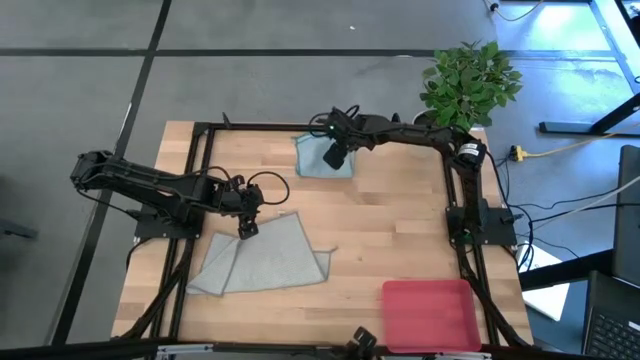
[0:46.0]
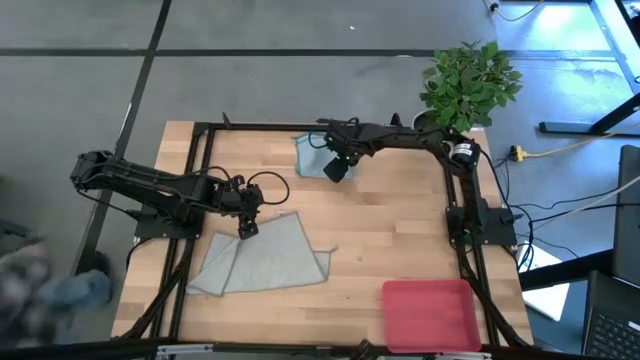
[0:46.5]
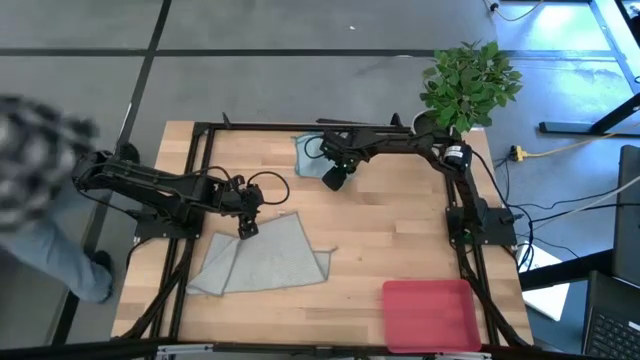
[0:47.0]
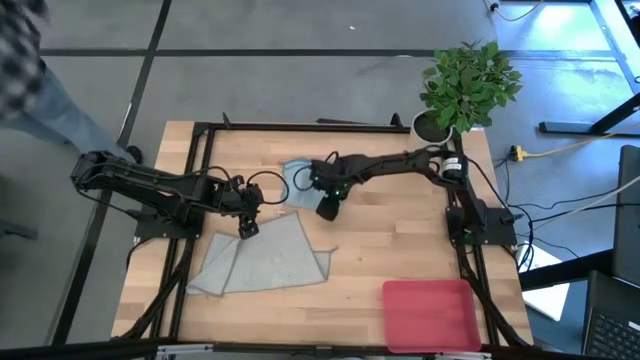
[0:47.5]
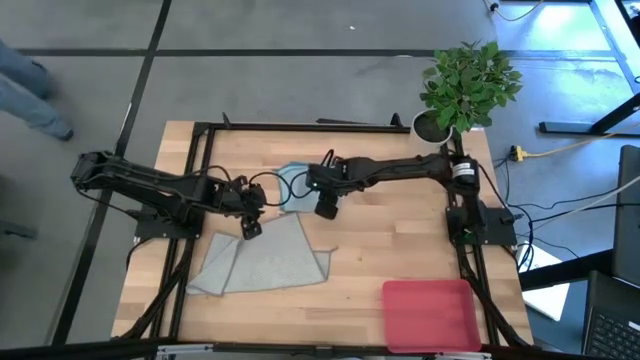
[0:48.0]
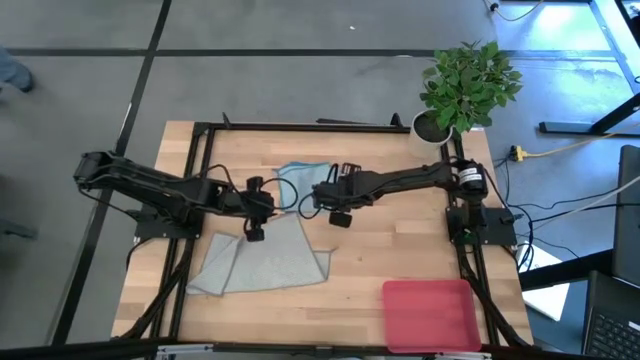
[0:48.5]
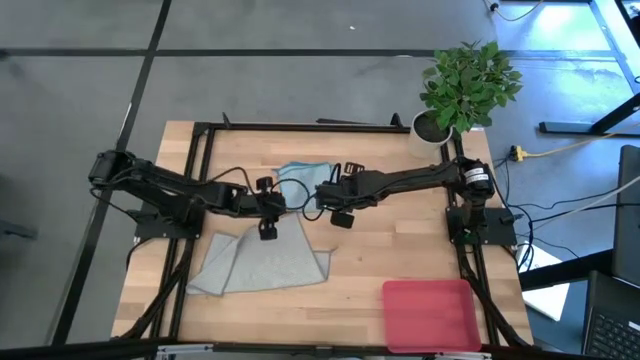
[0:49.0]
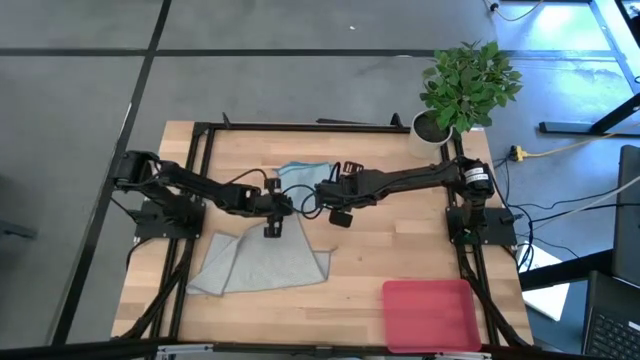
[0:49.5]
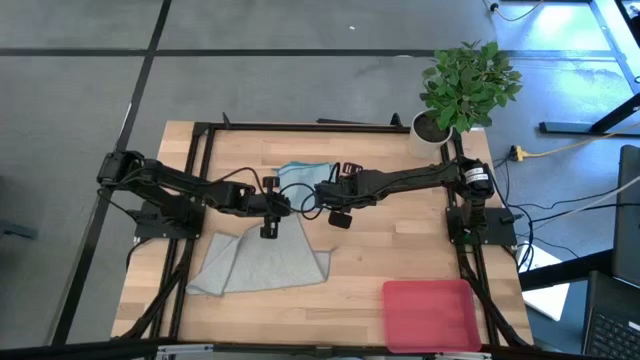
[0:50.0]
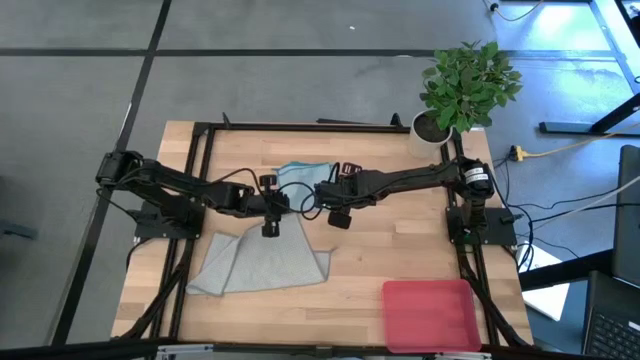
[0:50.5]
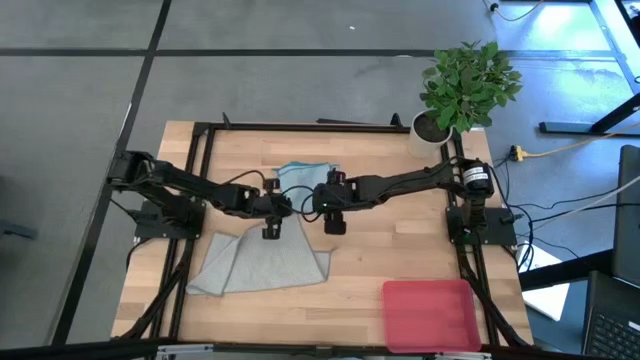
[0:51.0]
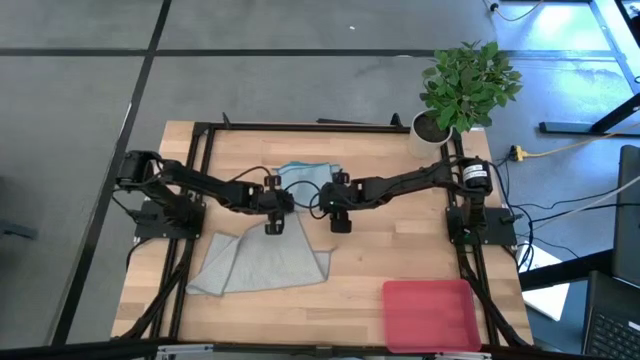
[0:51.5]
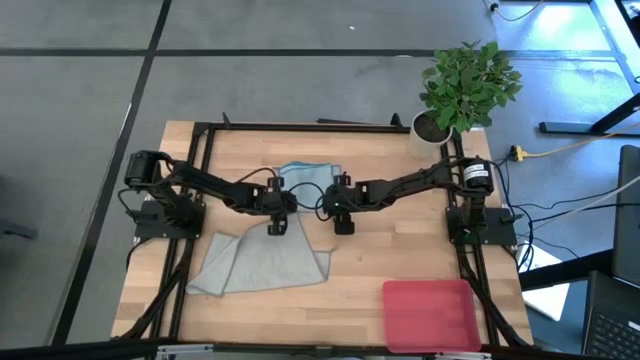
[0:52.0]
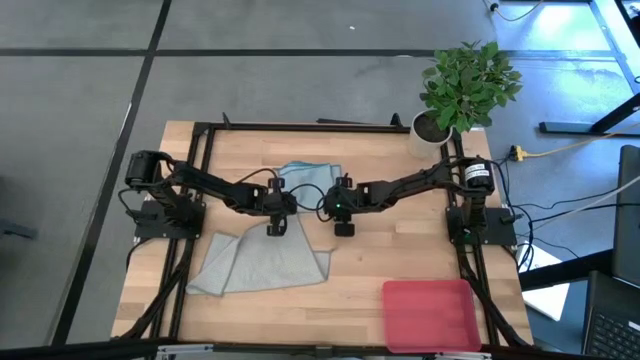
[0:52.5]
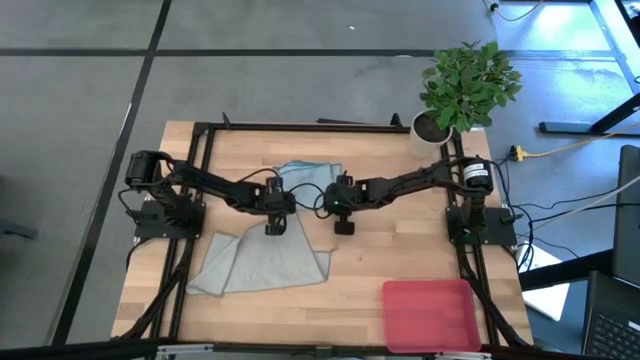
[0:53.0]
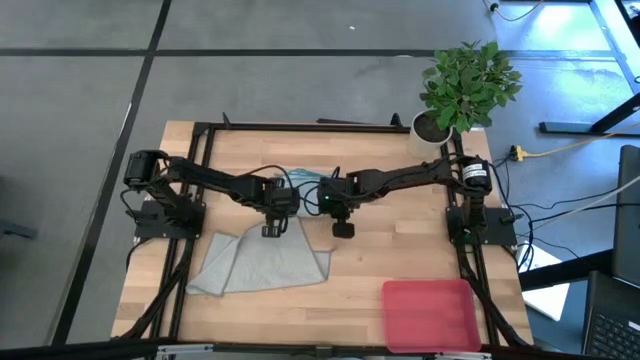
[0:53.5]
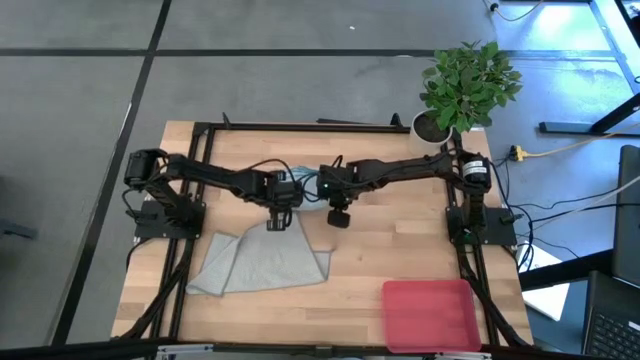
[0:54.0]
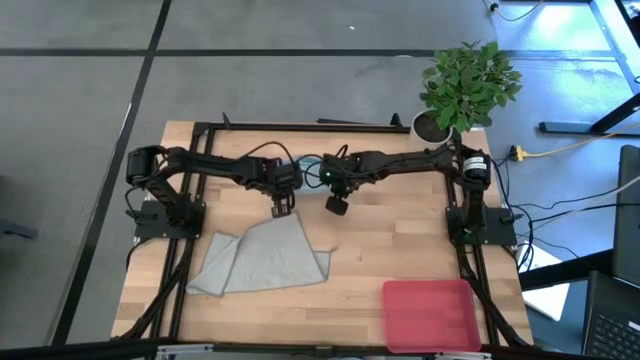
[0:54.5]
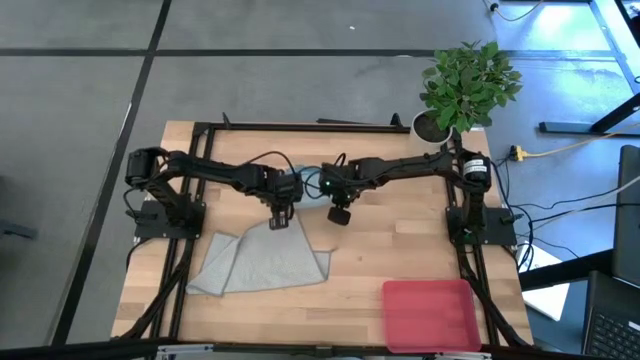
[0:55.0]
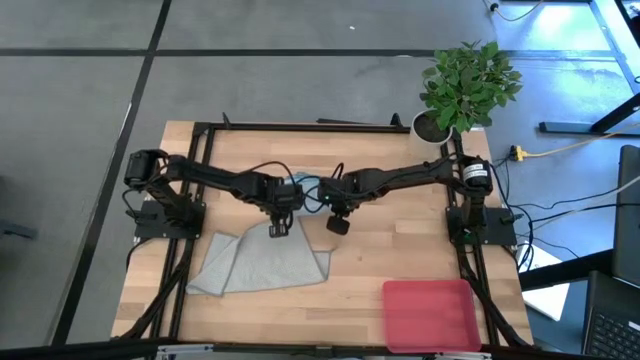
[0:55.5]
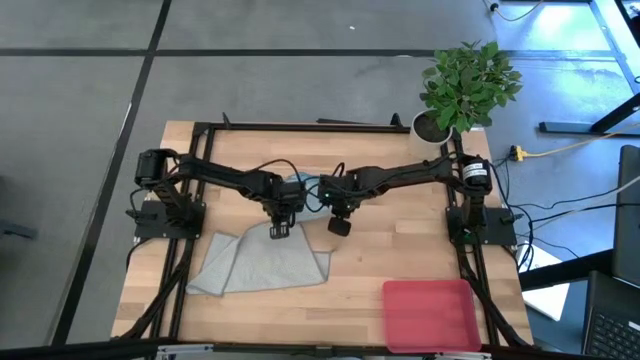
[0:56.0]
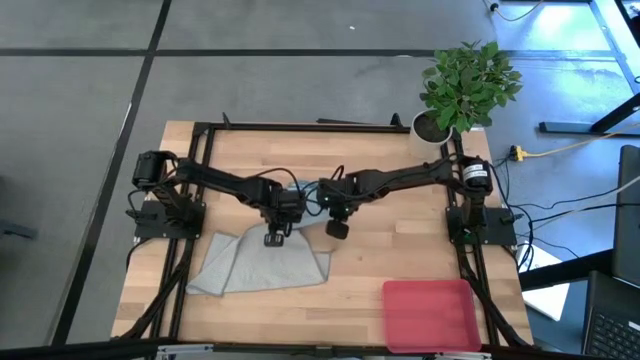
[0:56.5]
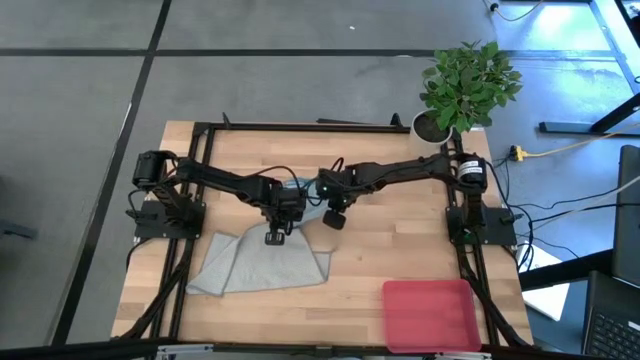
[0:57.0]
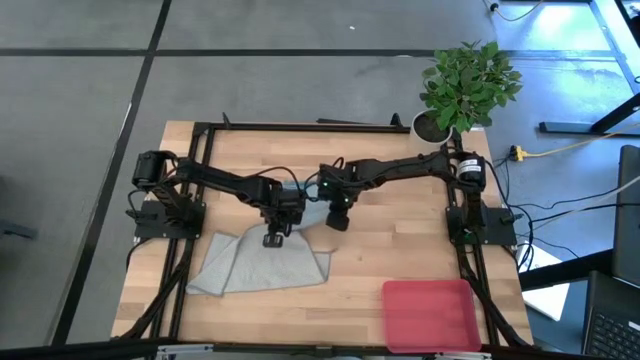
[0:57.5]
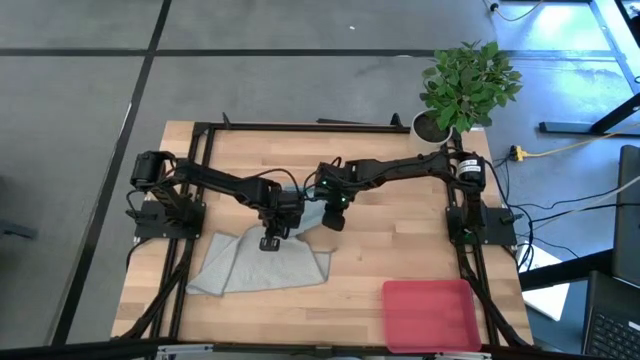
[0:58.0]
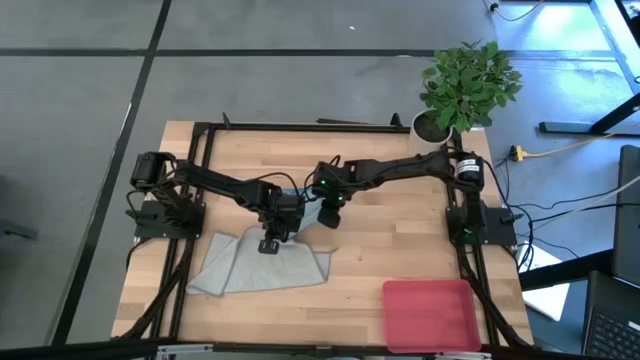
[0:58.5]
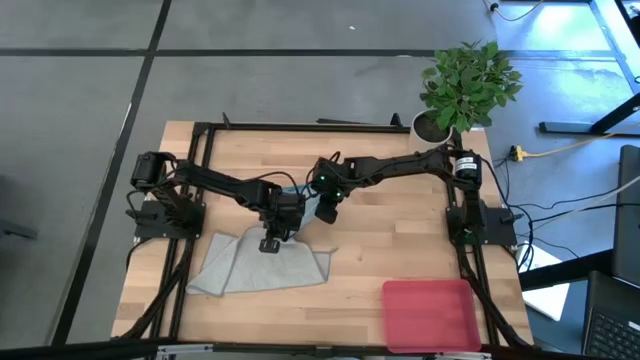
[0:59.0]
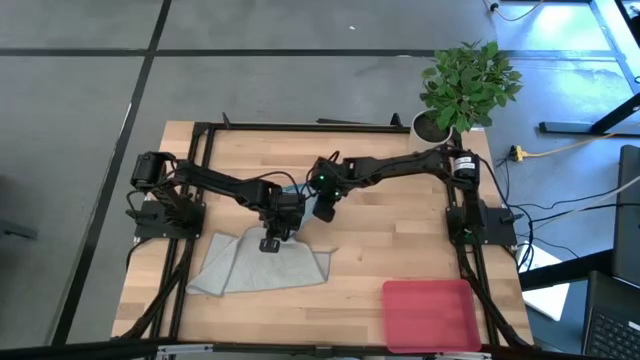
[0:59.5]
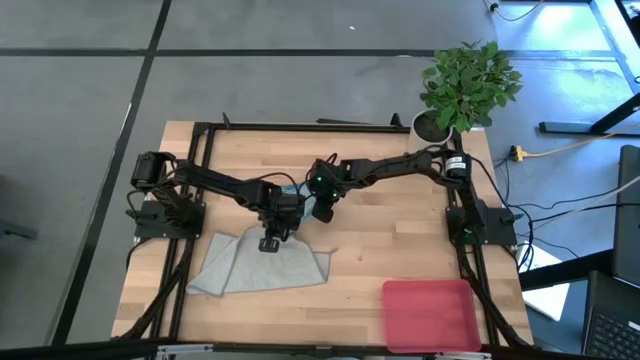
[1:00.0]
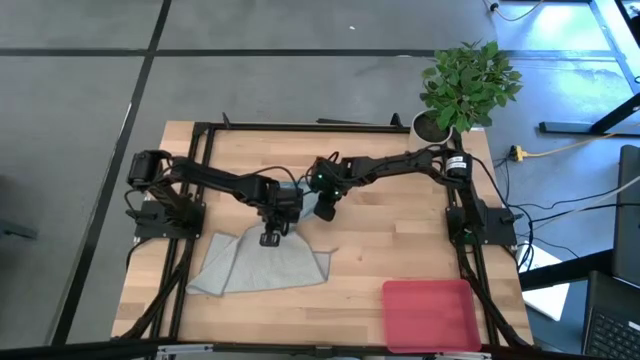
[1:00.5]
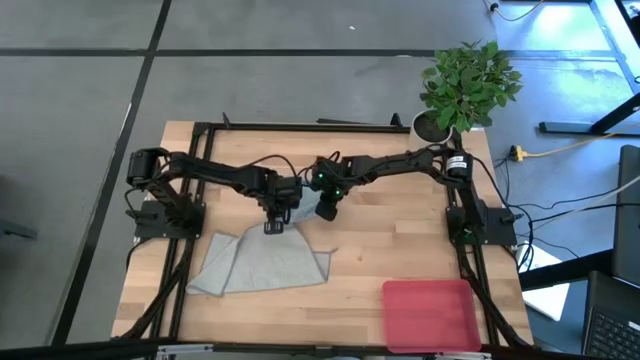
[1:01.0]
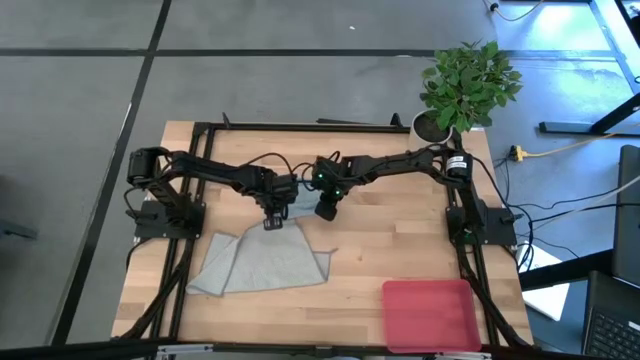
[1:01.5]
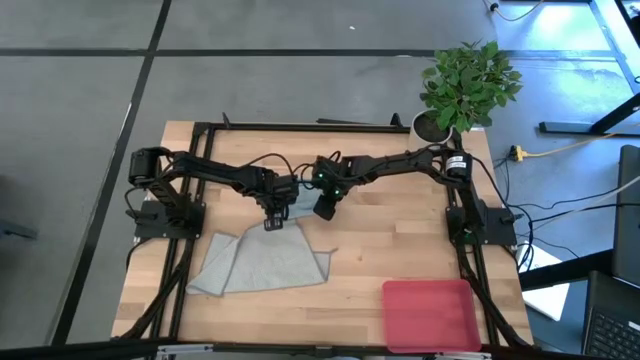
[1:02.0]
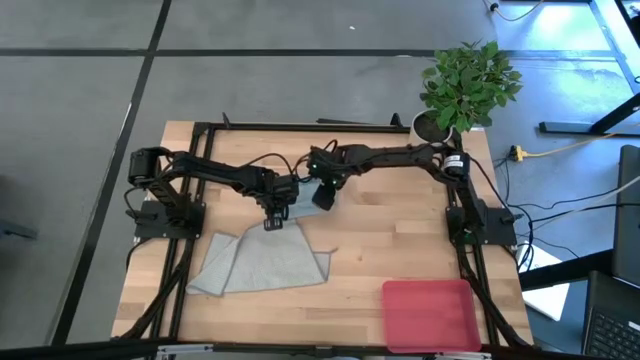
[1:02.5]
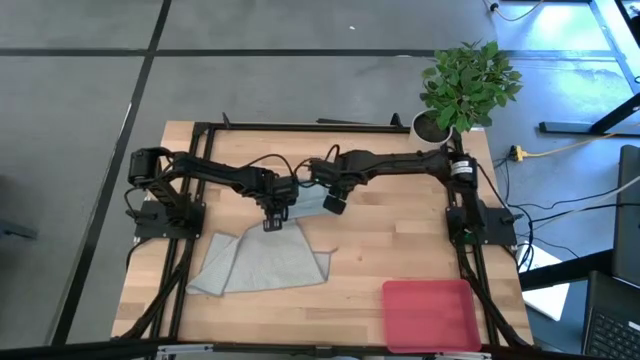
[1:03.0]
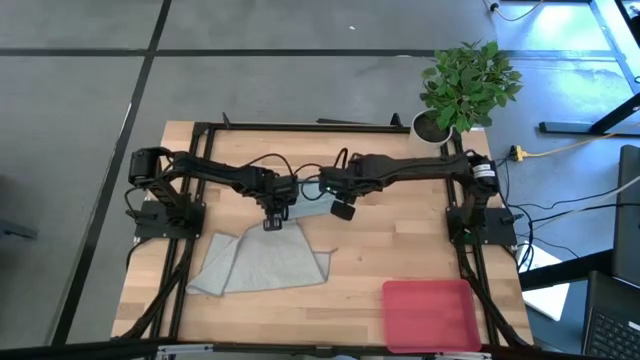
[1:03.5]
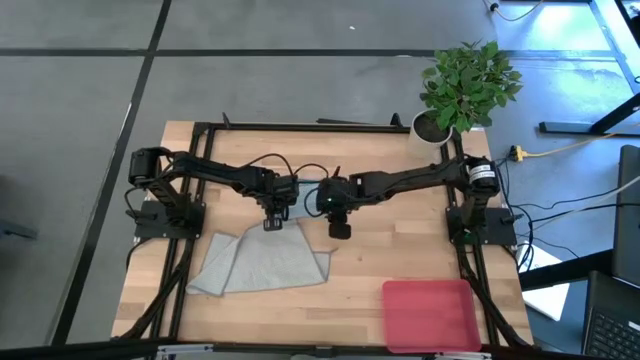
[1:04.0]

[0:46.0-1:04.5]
Task: Roll microfiber towels into tight, uniform cylinder then place into a basket
Roll blue towel
